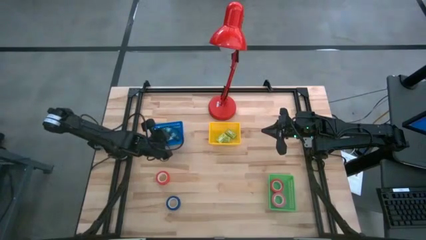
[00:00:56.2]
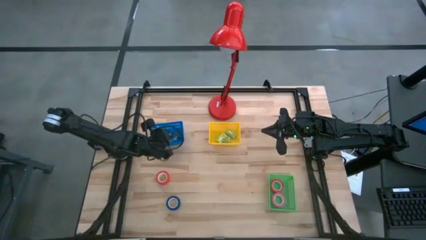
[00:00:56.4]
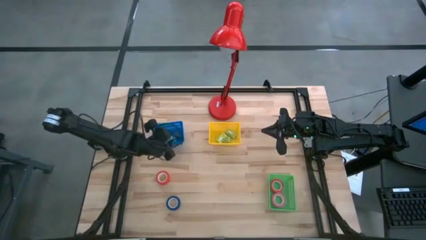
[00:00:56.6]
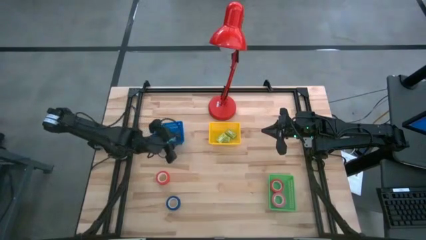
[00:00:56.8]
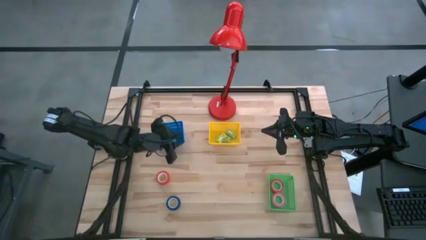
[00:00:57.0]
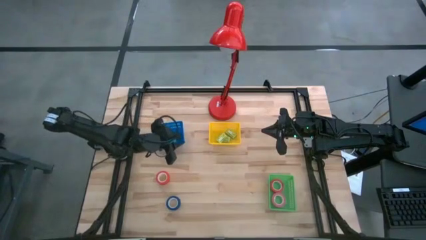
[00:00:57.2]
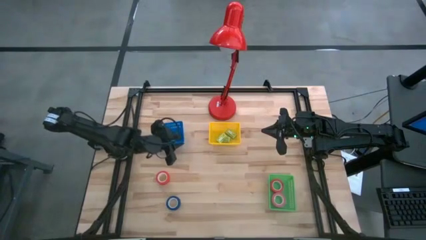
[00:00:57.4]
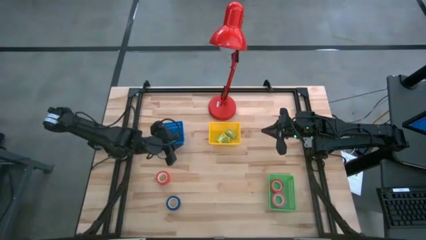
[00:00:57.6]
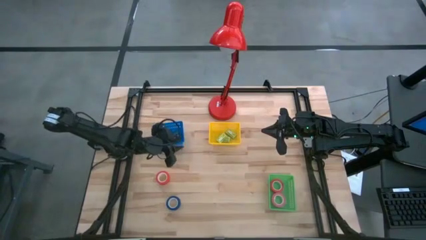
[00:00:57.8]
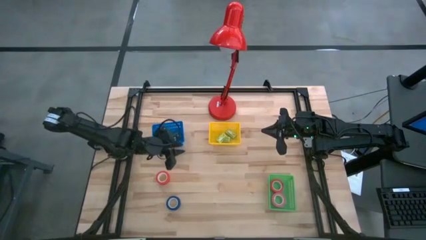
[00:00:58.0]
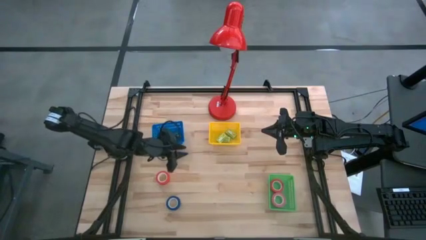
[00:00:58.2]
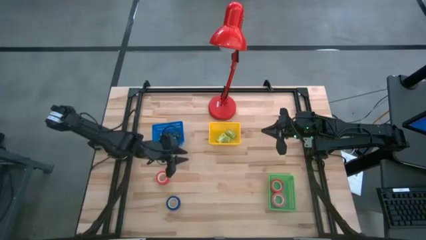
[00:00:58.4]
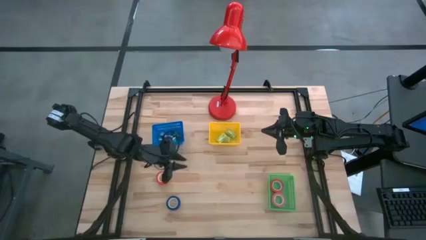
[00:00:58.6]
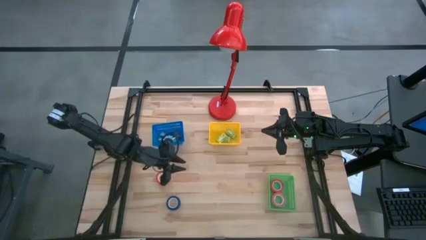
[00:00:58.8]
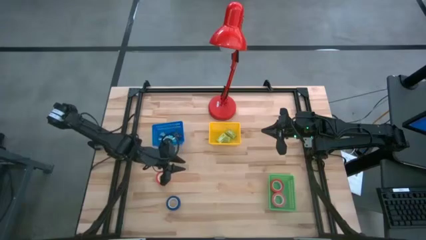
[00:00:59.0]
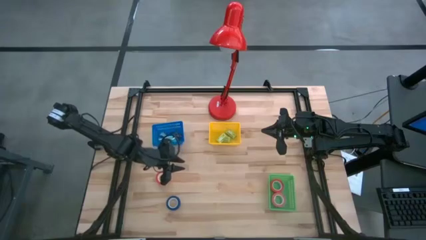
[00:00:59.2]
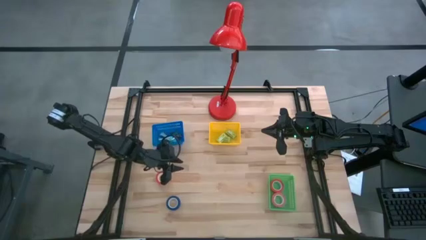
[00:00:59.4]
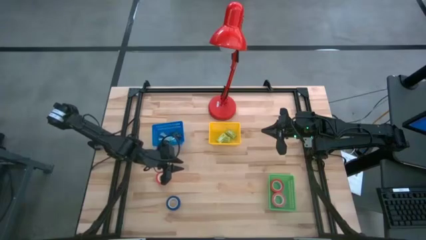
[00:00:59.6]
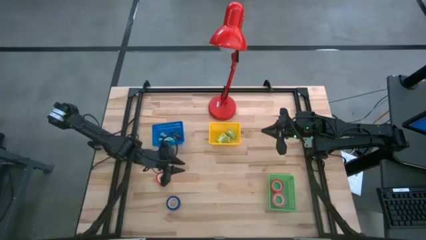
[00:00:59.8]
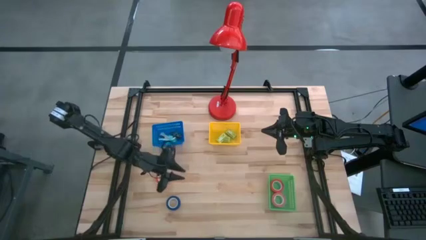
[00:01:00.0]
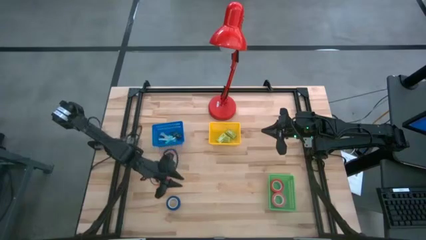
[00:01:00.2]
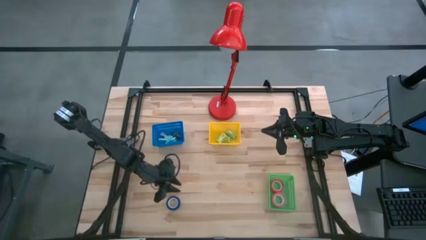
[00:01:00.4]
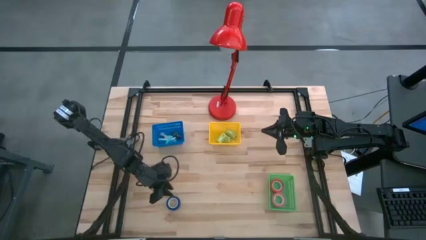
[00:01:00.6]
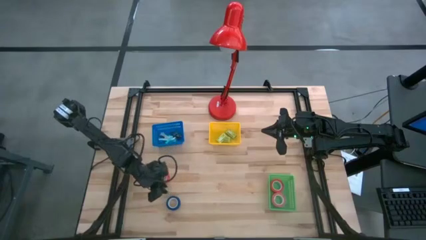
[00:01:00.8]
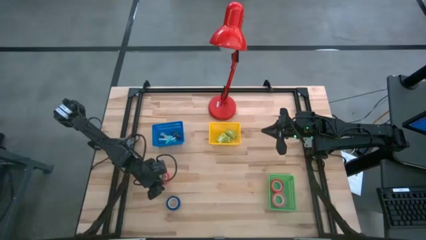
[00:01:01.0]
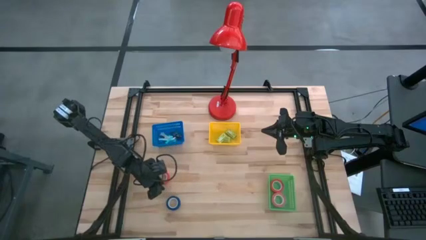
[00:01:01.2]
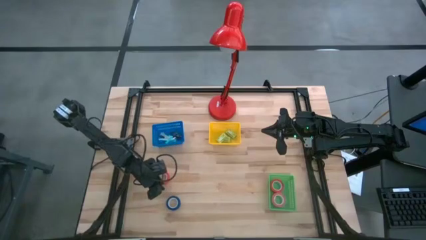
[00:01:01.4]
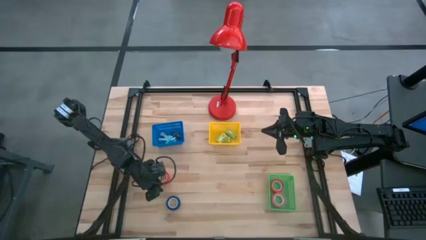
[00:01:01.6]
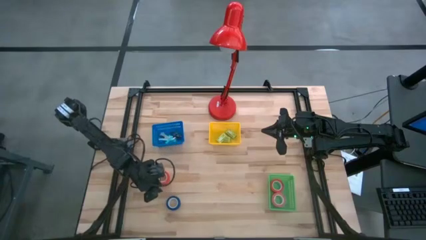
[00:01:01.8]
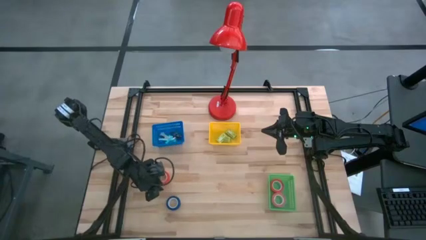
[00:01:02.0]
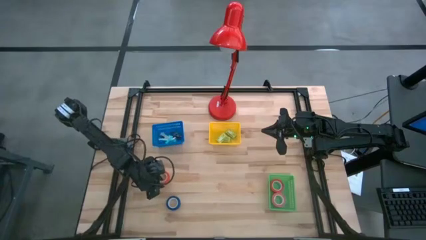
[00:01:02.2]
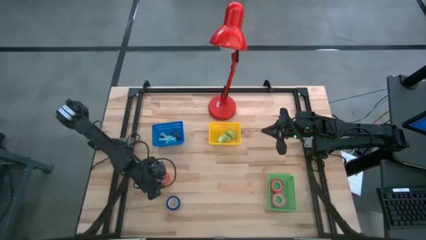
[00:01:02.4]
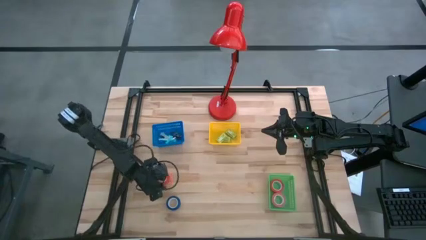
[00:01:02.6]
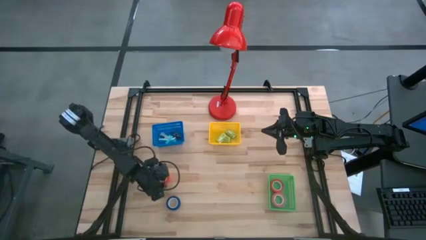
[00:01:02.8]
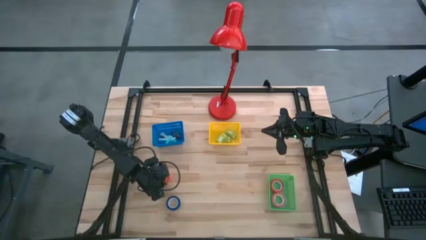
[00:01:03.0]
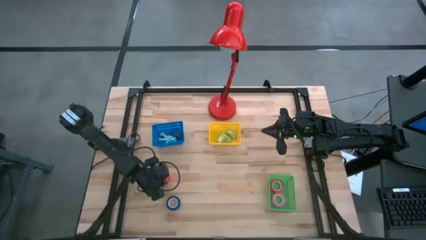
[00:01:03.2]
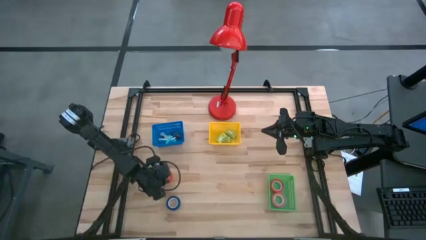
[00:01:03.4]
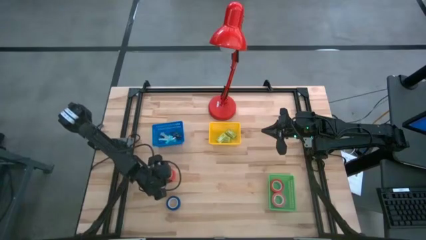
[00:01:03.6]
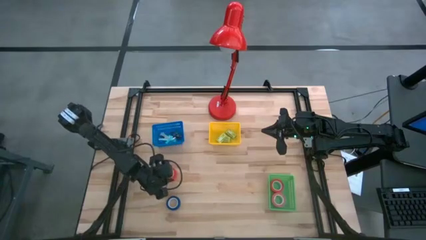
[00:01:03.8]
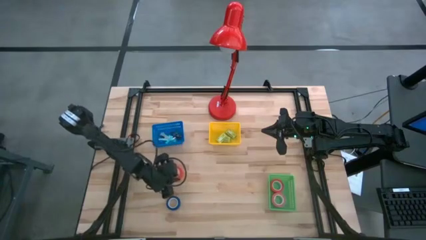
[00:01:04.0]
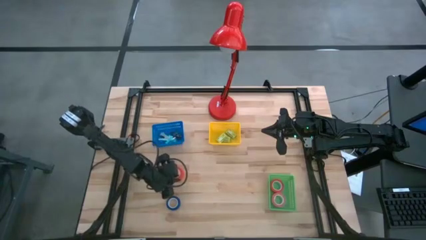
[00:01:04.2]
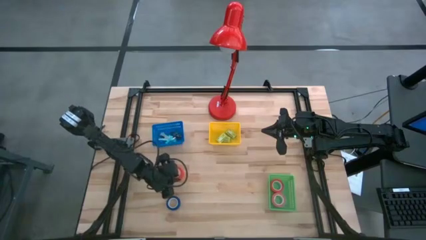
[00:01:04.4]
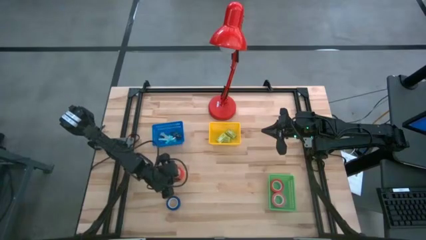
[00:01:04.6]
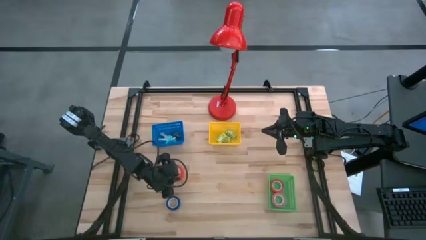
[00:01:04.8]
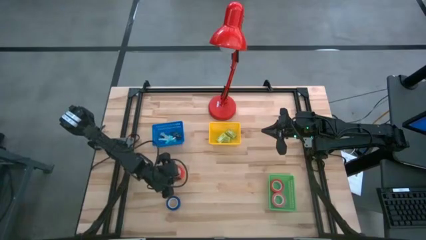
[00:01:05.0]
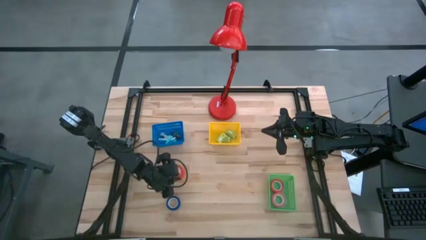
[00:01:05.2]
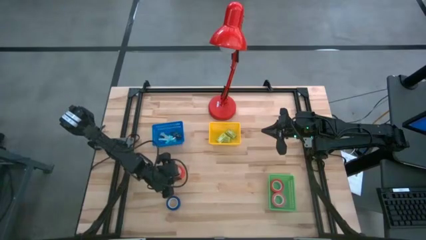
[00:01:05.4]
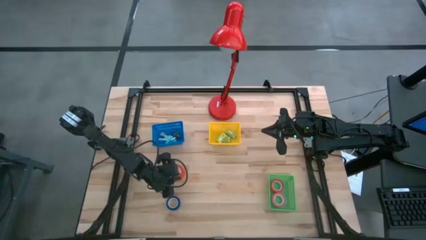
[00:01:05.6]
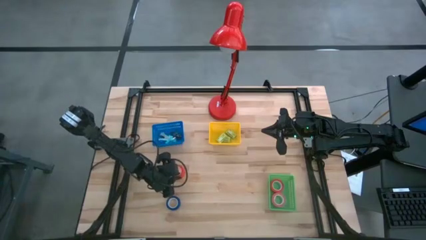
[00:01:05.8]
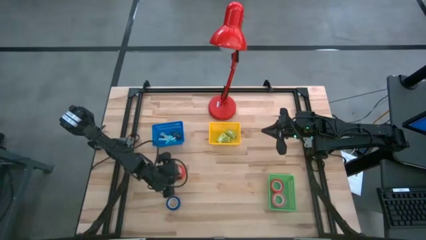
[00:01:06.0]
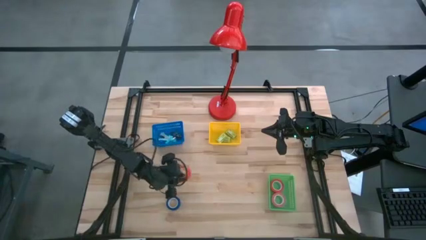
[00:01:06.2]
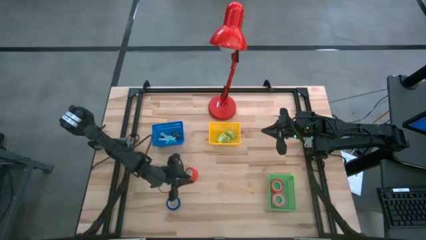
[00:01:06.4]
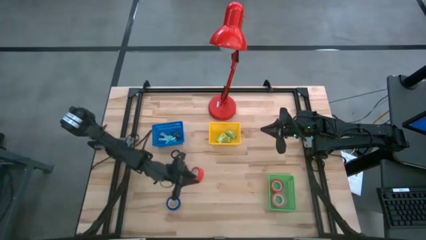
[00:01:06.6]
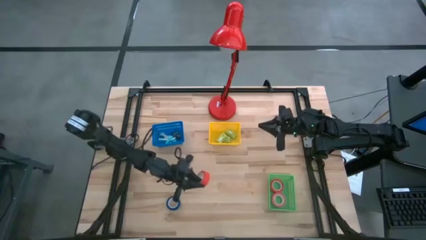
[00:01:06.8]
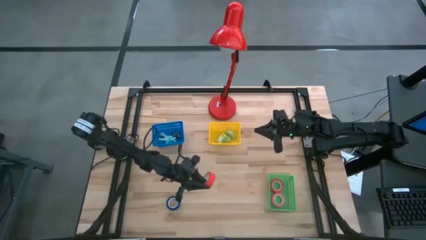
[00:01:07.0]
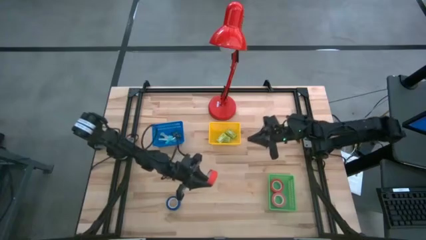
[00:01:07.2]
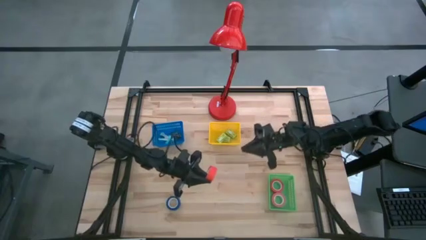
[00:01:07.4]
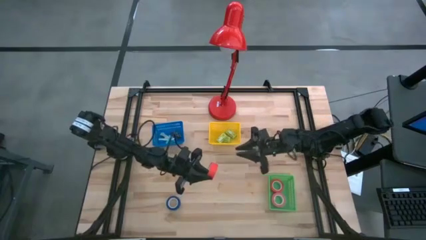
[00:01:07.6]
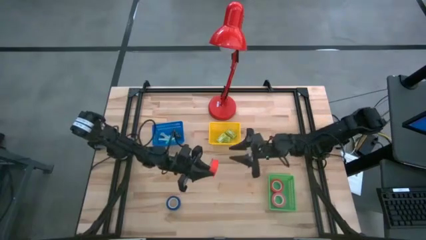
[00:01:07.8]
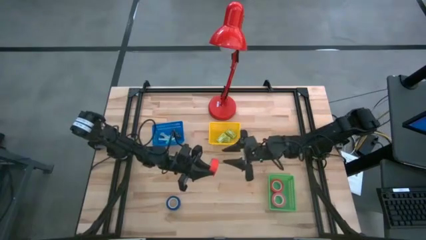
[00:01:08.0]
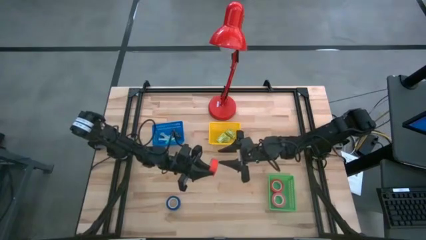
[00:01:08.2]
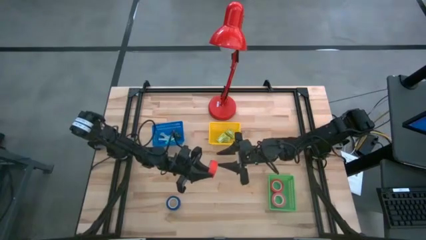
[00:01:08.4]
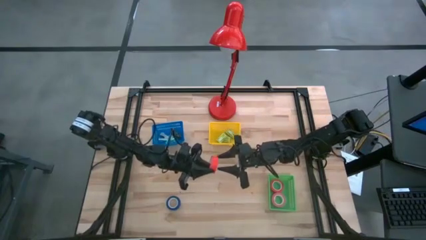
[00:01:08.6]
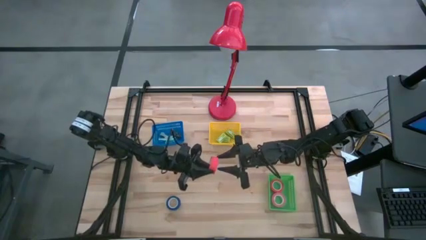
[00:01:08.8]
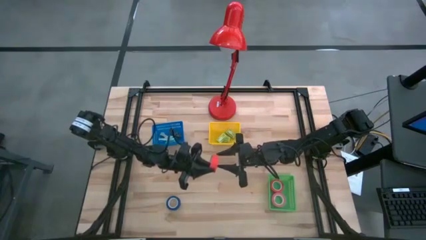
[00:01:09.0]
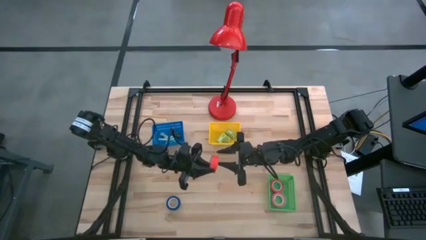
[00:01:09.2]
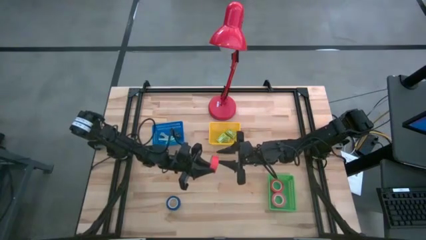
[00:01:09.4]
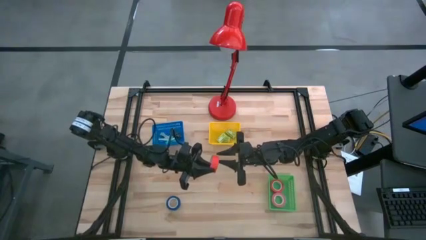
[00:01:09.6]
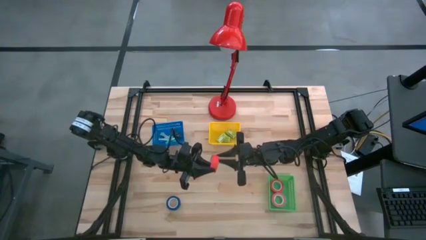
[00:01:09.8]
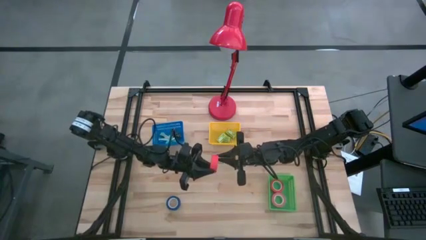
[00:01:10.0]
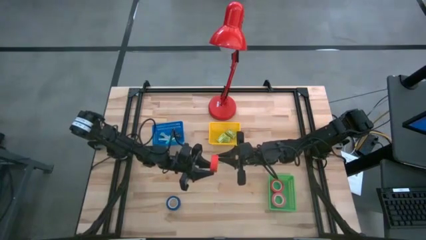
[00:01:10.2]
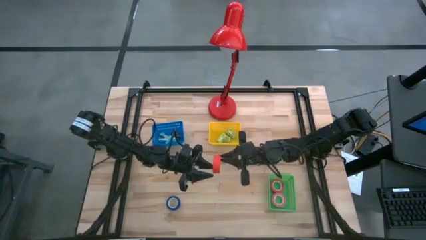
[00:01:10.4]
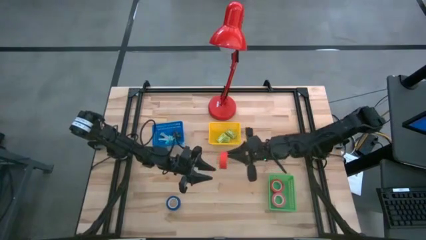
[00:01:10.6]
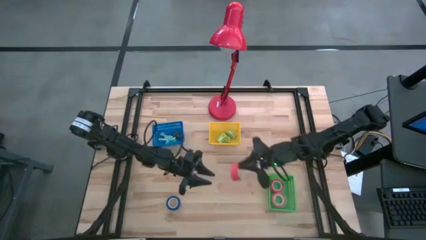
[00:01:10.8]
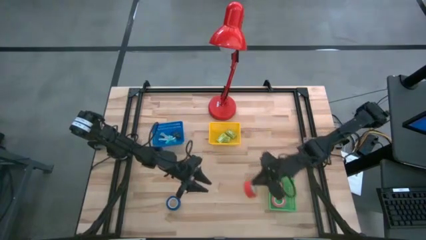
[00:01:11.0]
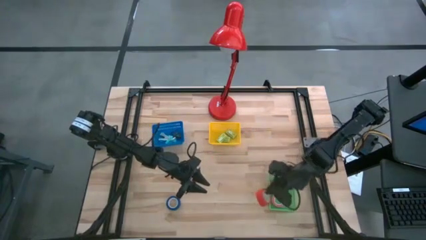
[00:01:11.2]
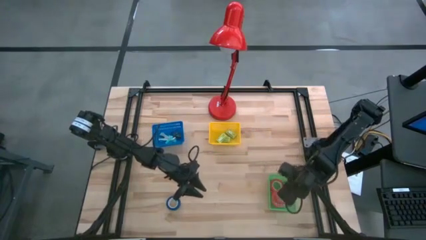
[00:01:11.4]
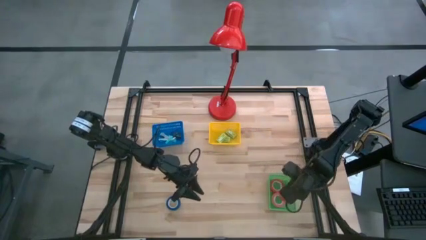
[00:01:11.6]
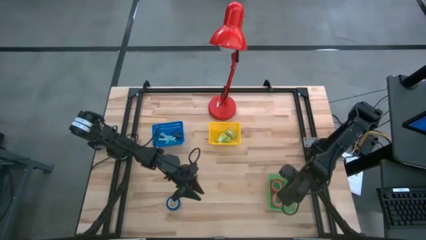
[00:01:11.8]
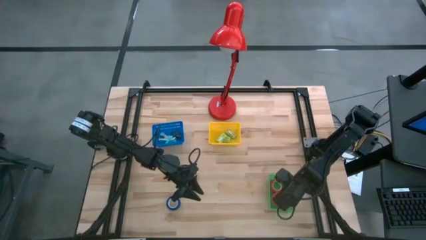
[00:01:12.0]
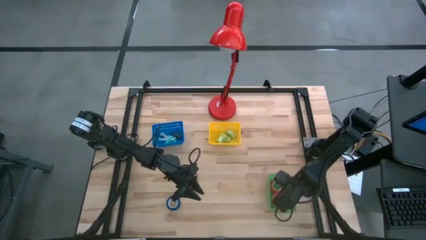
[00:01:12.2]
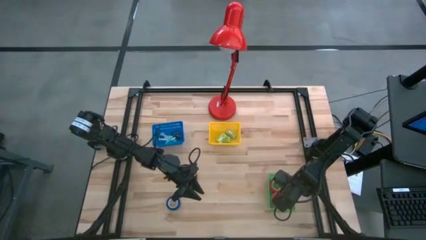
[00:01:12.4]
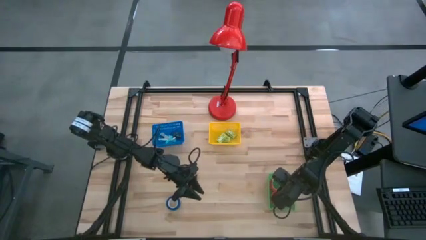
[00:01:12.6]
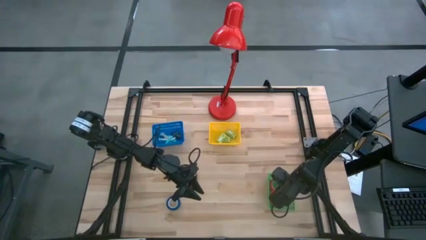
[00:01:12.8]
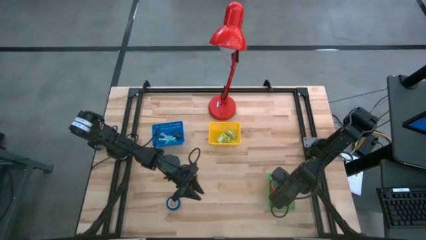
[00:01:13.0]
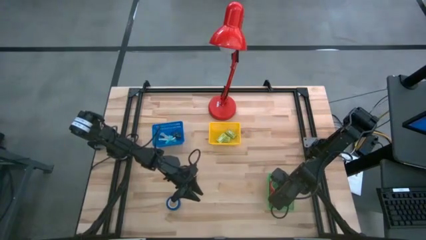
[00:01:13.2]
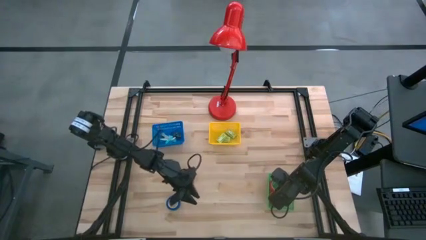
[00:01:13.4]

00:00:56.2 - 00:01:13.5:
Task: Pick and place Stapler, Stapler remover, tape
Put the red tape into the green bin
